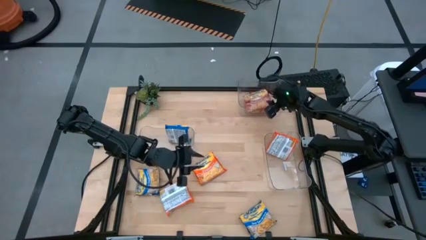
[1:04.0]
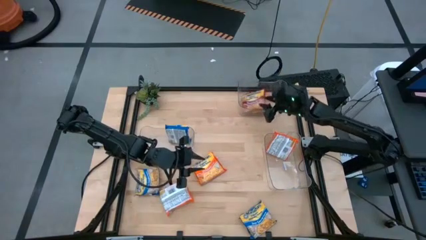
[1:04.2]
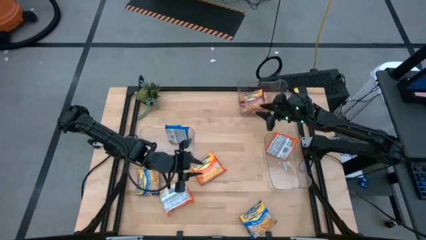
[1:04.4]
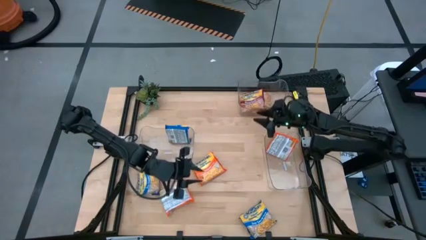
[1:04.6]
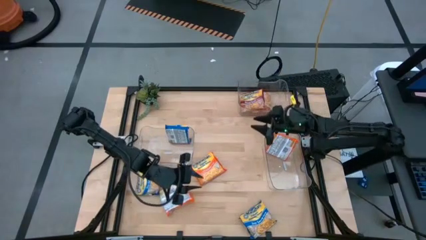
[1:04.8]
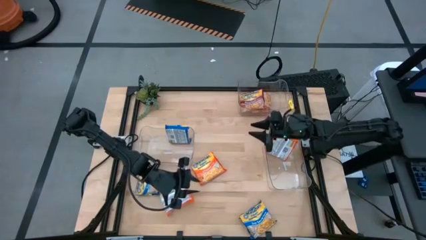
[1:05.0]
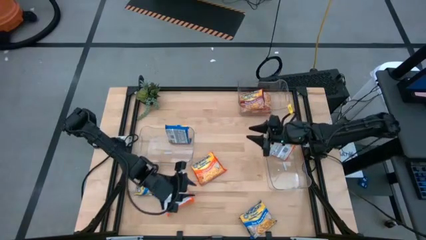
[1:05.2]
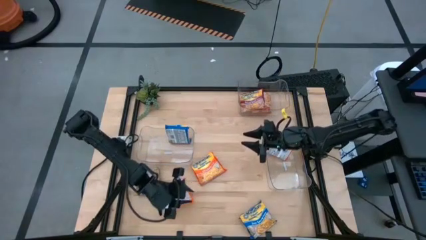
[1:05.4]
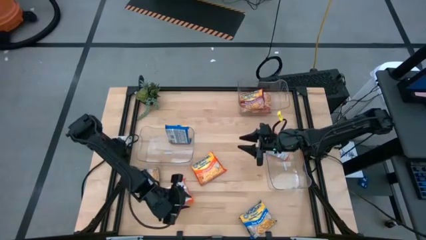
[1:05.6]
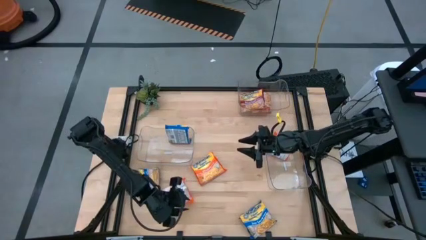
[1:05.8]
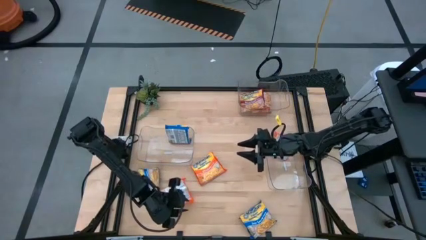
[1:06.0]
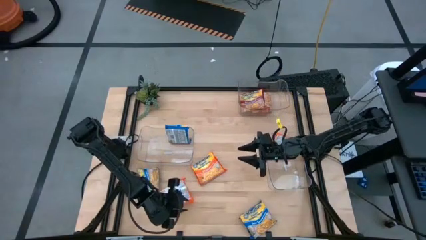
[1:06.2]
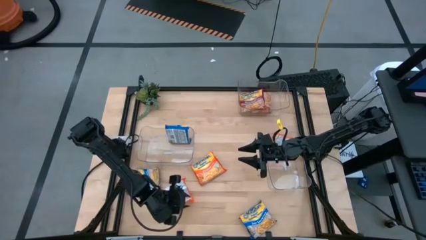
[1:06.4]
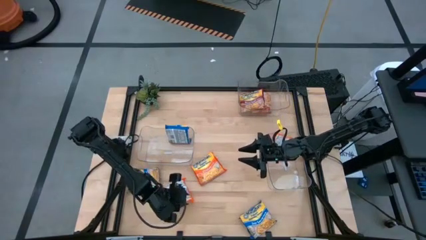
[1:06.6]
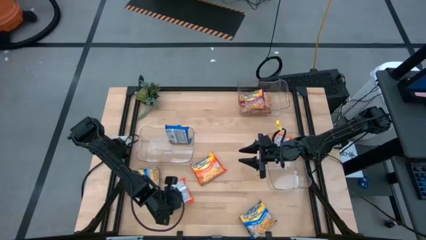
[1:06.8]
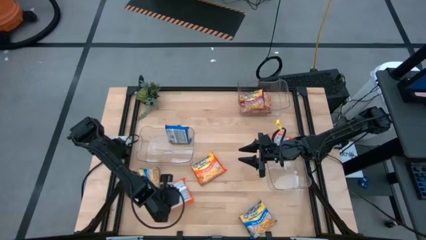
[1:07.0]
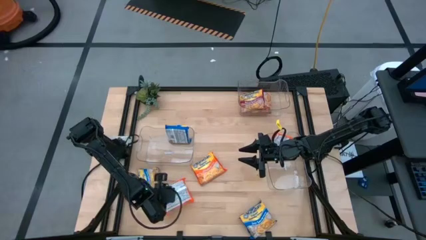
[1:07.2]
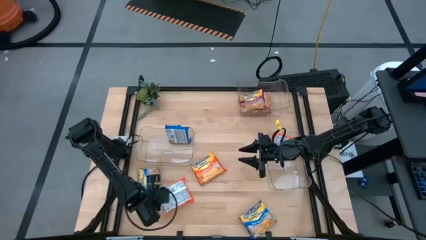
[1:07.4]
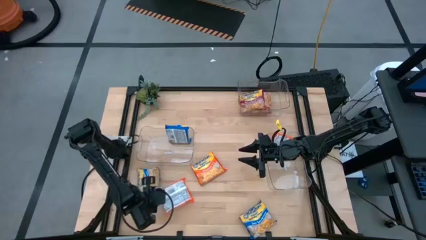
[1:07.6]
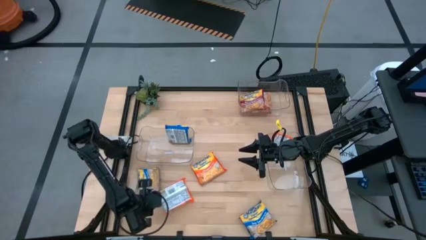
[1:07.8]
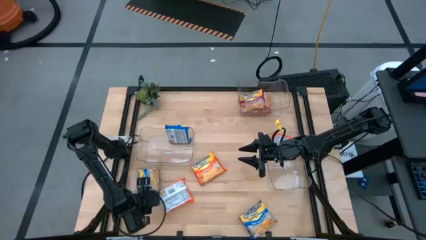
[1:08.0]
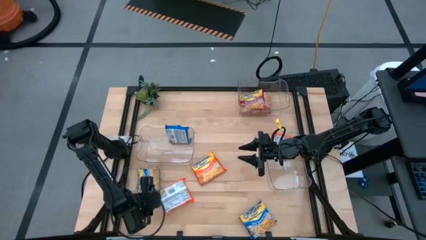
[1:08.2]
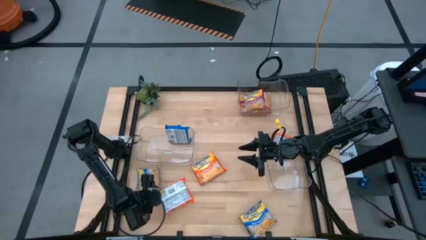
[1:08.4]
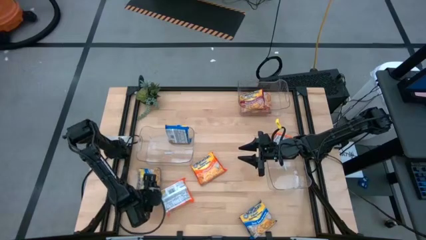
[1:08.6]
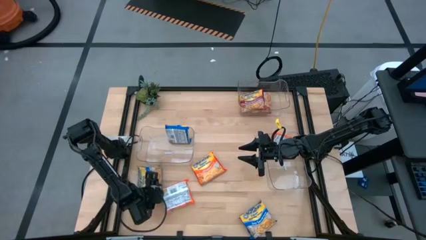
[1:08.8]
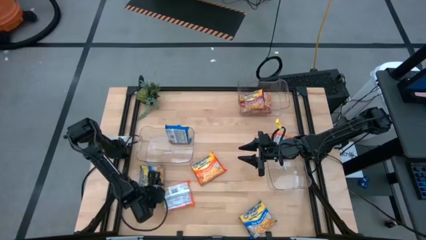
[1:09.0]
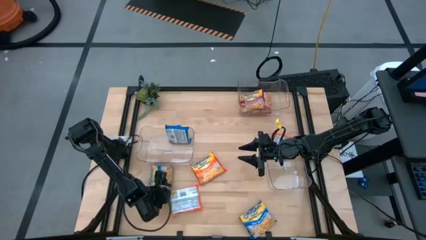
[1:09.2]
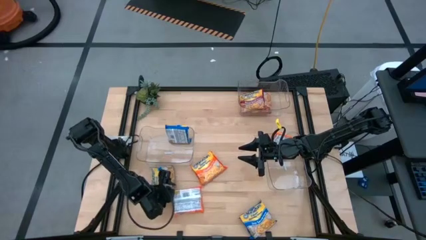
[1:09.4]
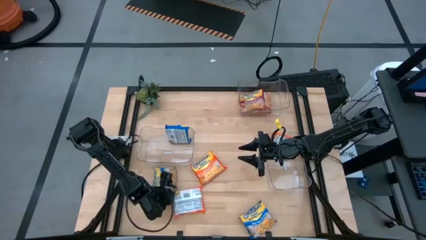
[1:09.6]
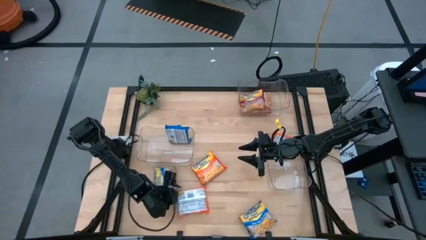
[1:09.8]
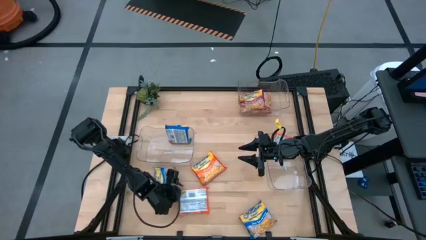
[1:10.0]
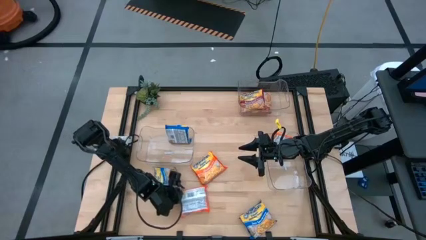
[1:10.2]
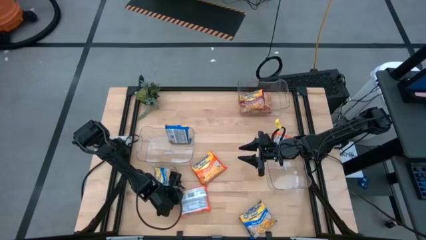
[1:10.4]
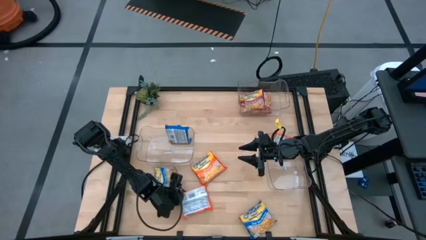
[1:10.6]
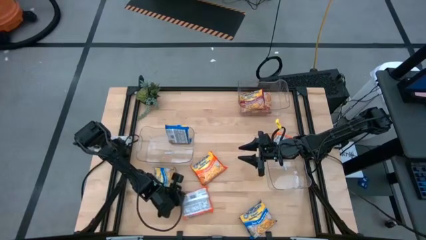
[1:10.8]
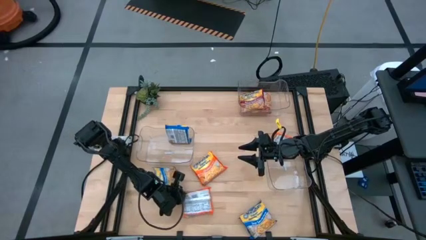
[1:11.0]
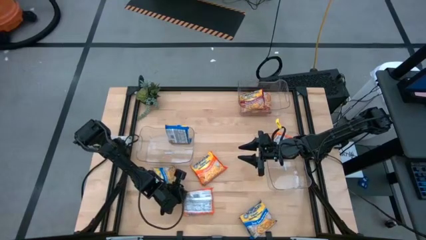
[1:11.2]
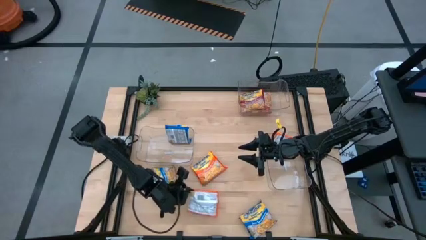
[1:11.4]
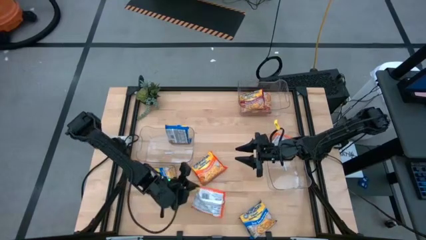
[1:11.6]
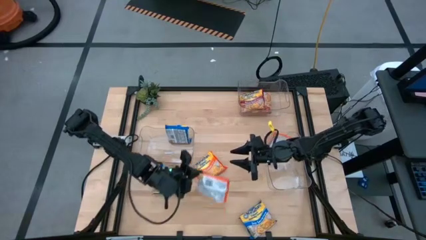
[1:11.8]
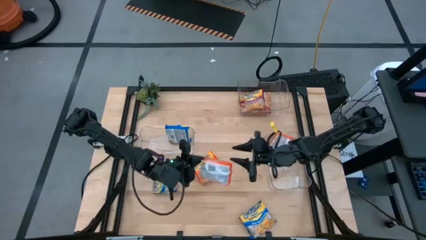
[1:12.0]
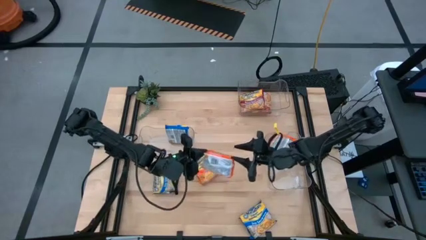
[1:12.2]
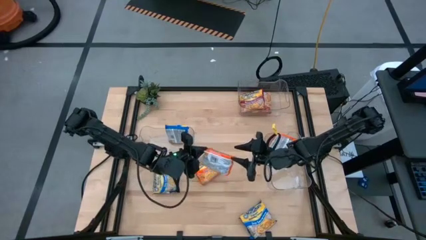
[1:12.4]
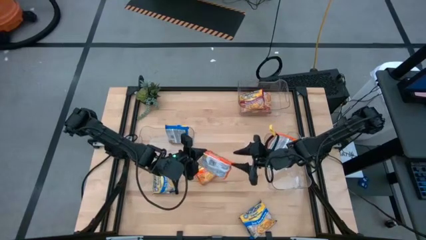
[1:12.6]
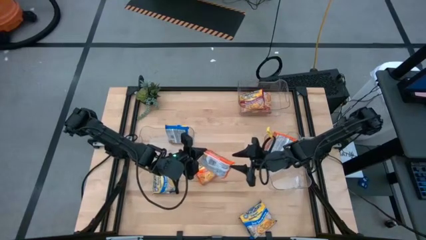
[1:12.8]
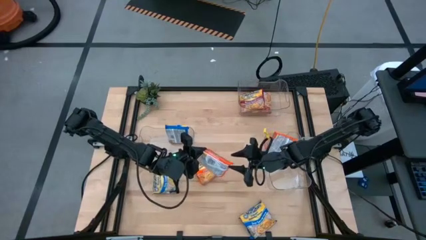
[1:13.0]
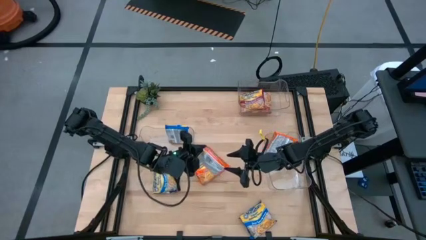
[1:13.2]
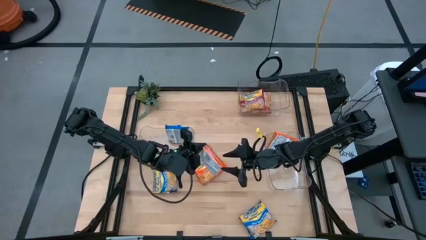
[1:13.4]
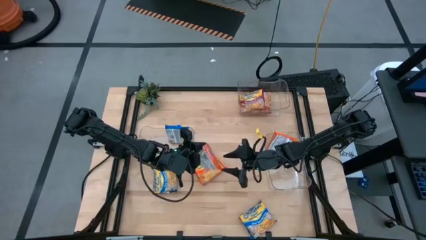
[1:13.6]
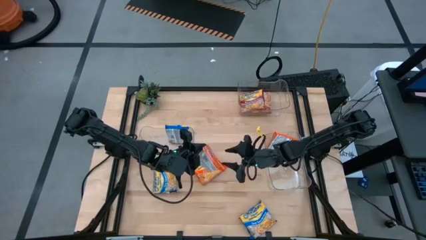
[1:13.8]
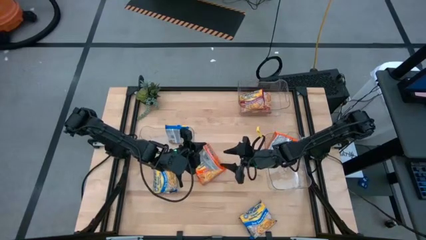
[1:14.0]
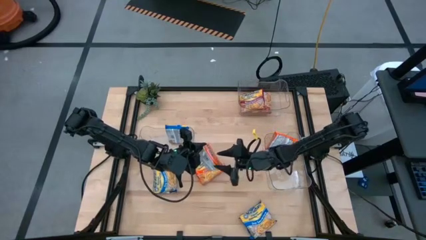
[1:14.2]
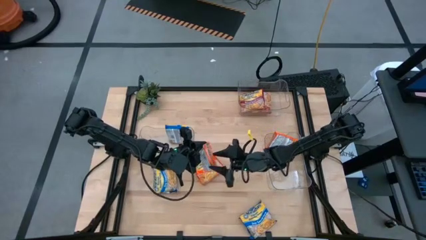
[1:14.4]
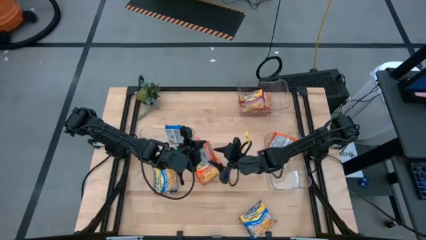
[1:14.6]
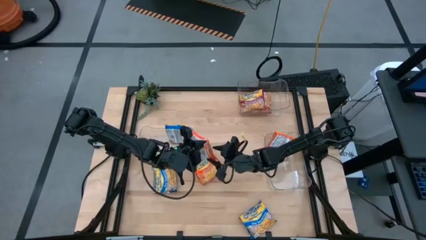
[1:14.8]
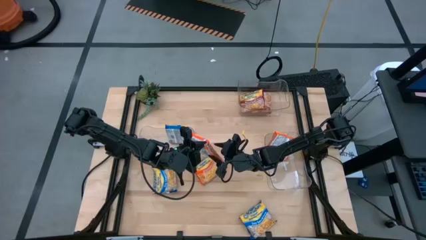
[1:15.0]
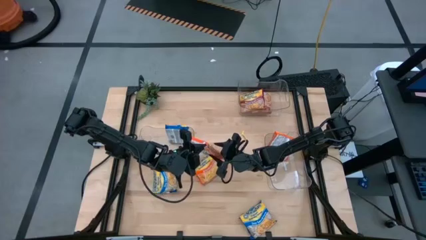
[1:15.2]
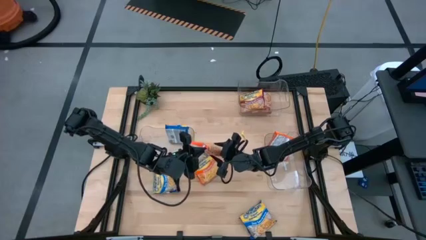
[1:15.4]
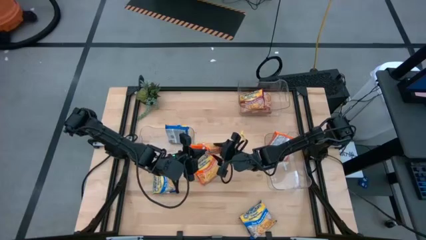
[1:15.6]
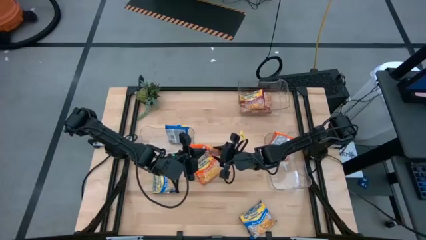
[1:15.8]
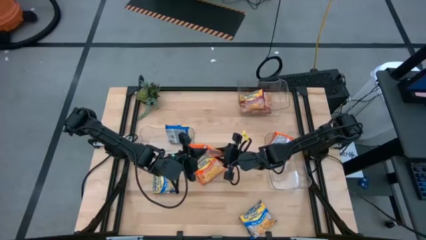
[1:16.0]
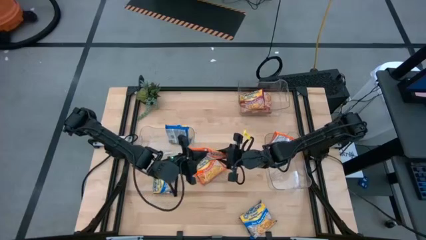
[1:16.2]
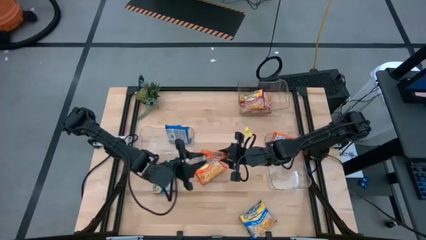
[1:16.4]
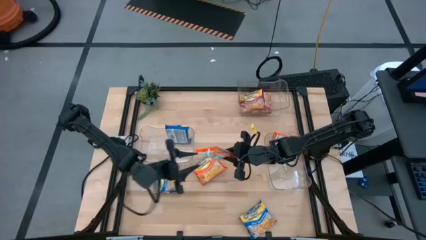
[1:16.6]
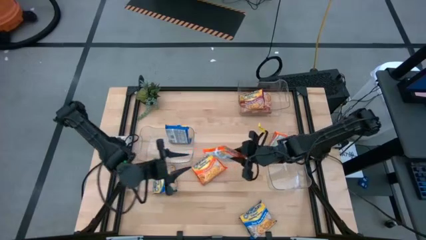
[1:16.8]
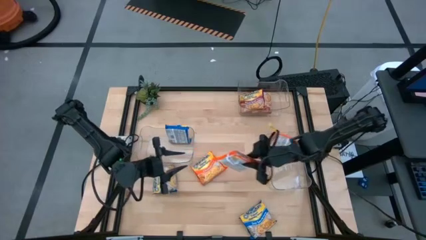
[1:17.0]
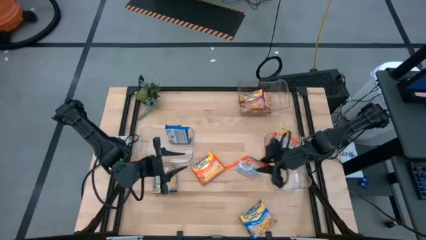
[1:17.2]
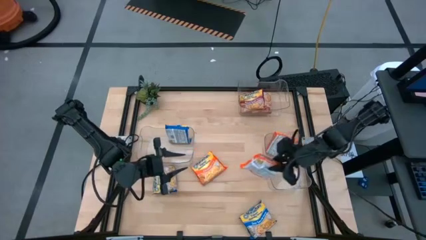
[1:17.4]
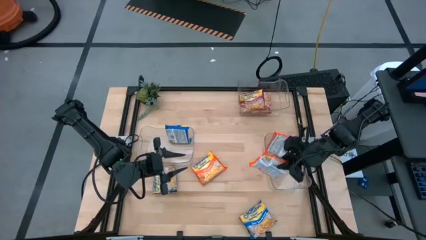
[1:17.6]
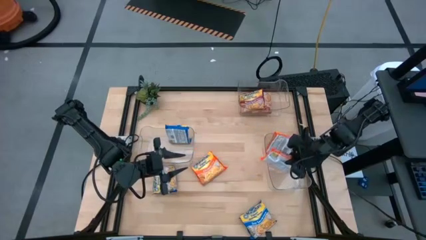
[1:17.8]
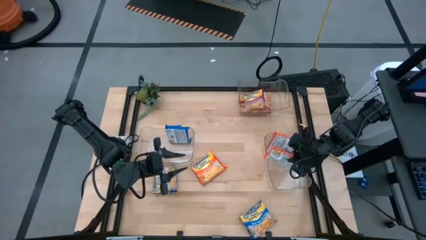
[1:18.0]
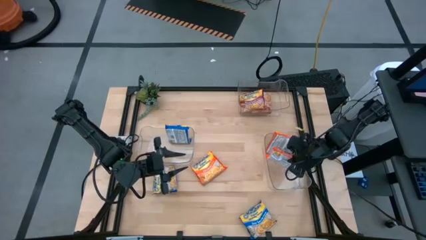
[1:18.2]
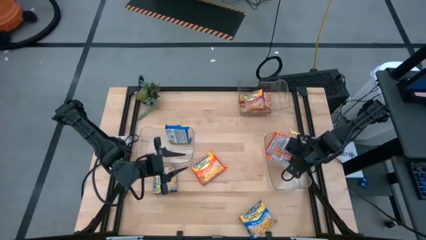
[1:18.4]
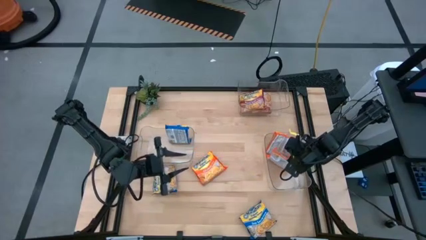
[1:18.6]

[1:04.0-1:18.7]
Task: Sort Maruchan noodles
Put the bottom orange noodle pack into the bottom right transparent bin

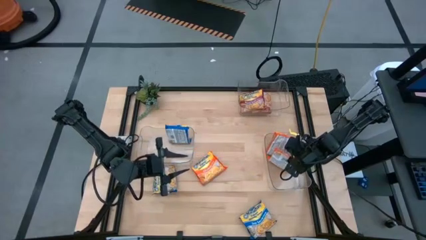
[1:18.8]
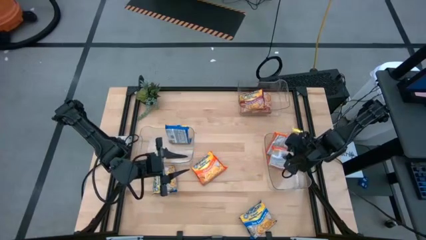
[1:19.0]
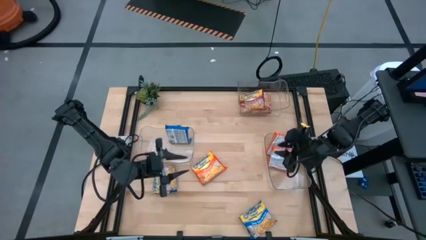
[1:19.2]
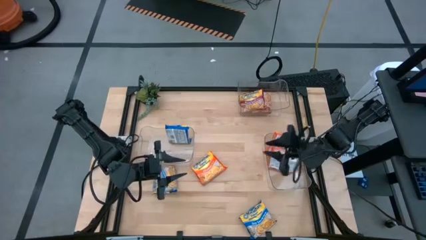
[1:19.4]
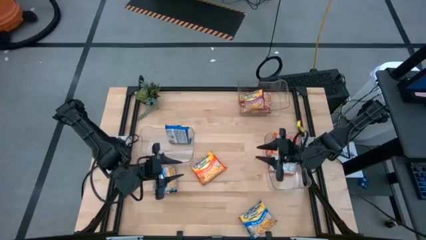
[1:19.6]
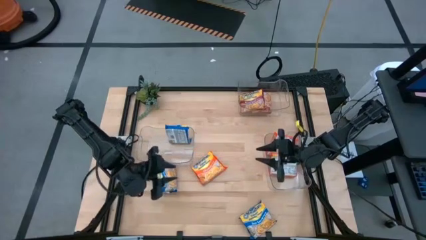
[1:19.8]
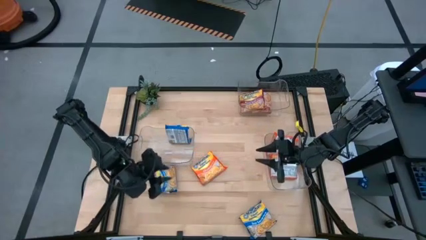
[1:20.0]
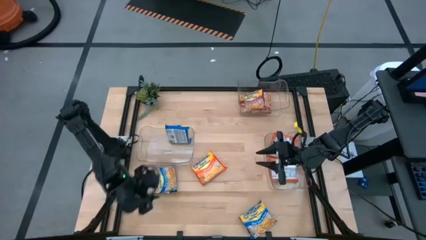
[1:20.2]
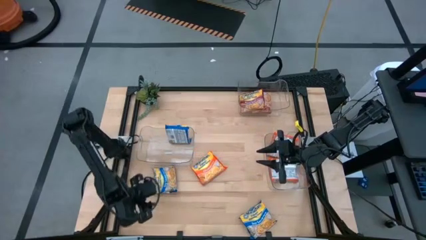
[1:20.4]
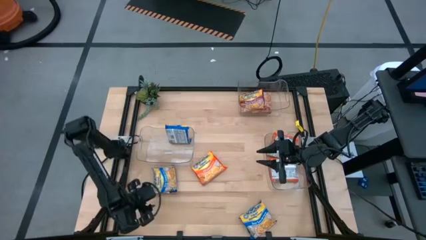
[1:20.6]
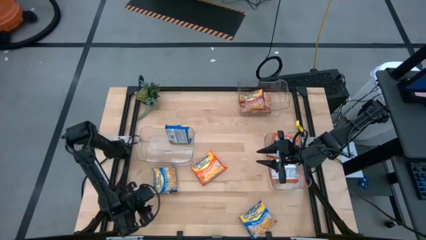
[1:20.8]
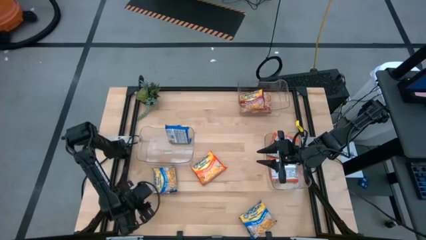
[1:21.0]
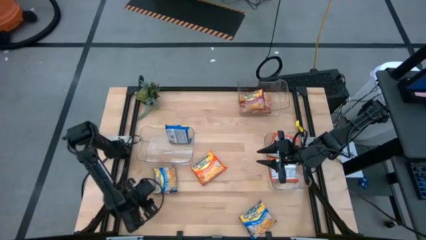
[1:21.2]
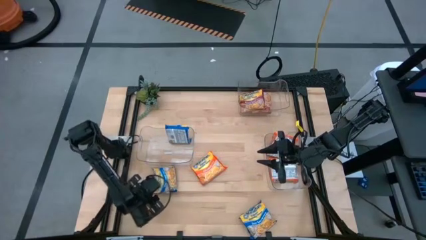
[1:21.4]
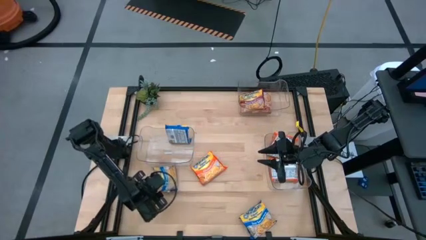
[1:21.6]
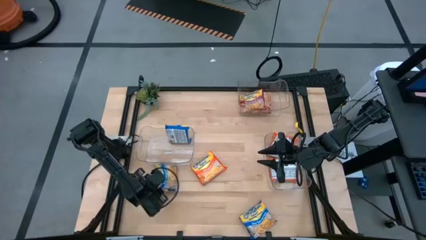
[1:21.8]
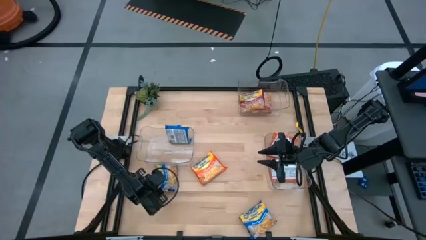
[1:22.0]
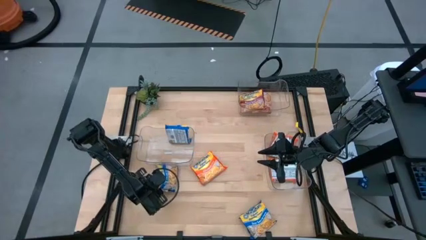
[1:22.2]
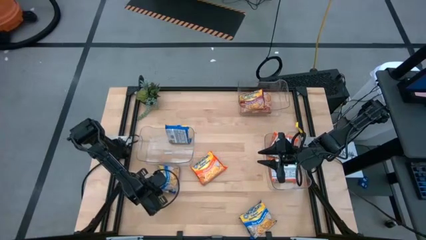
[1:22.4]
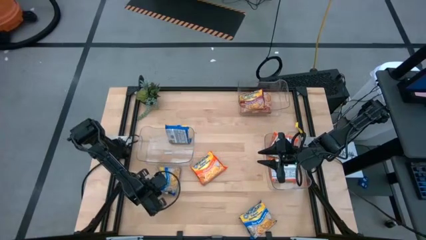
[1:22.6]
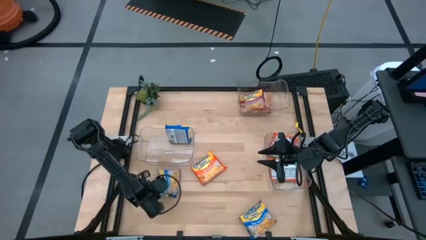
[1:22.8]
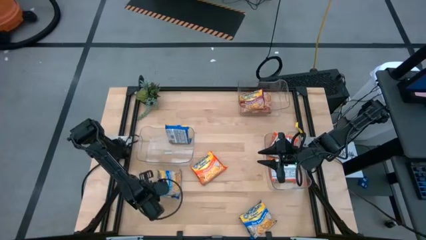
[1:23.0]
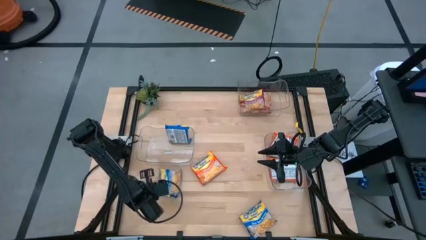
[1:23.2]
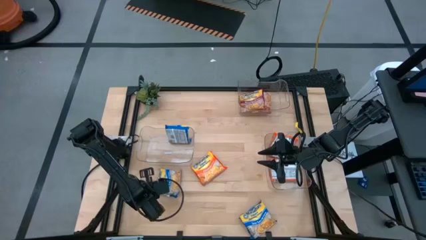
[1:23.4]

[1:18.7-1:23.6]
Put the top blue noodle pack into the bottom left transparent bin
